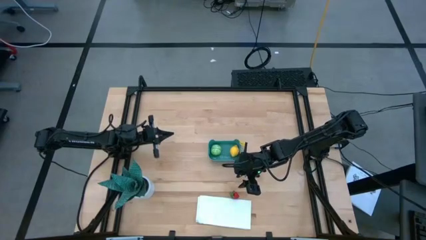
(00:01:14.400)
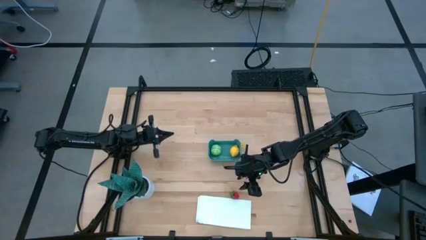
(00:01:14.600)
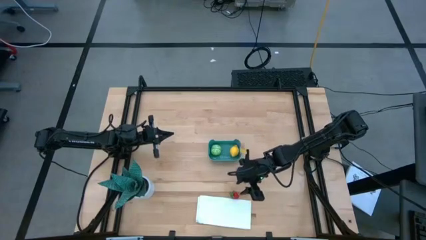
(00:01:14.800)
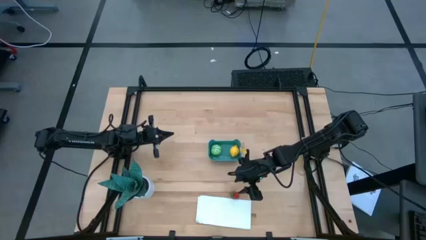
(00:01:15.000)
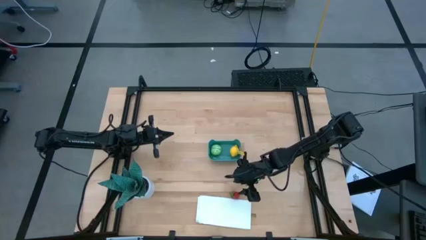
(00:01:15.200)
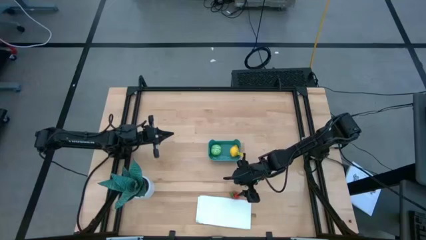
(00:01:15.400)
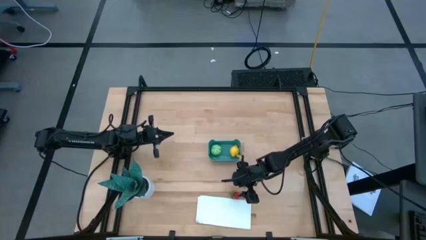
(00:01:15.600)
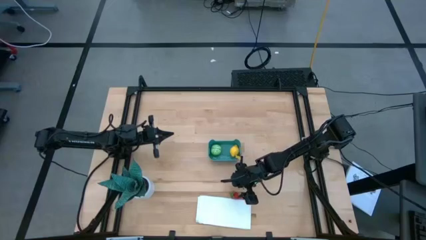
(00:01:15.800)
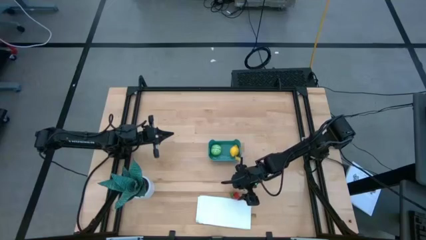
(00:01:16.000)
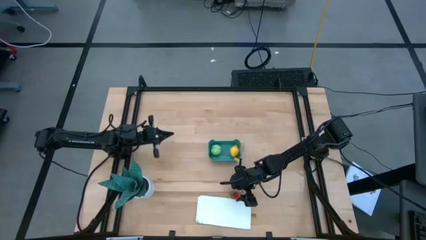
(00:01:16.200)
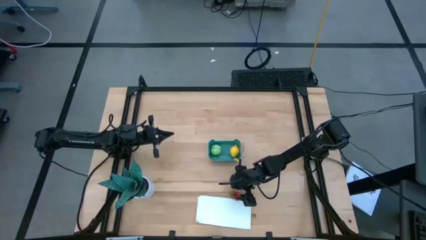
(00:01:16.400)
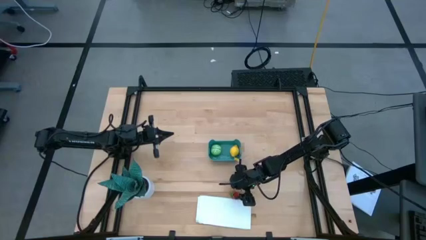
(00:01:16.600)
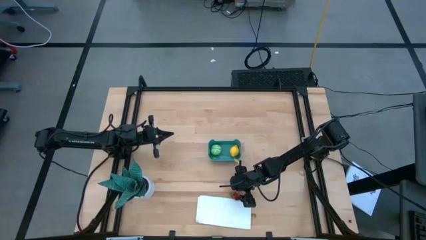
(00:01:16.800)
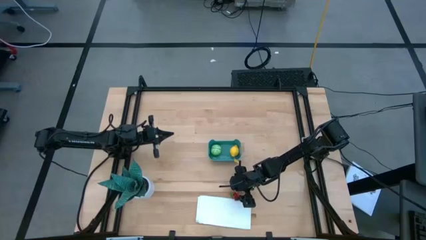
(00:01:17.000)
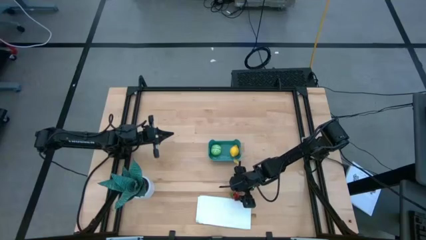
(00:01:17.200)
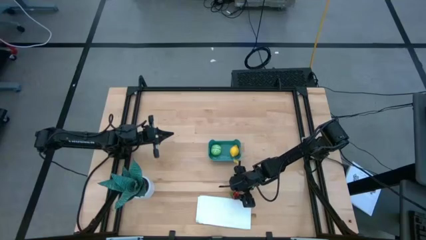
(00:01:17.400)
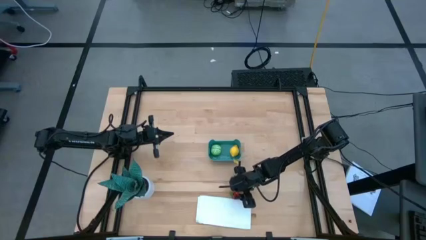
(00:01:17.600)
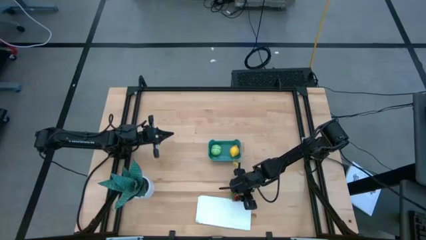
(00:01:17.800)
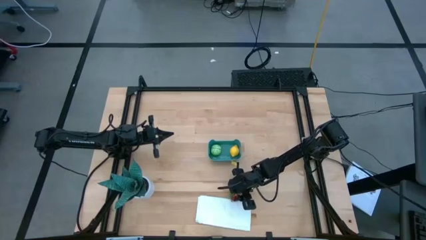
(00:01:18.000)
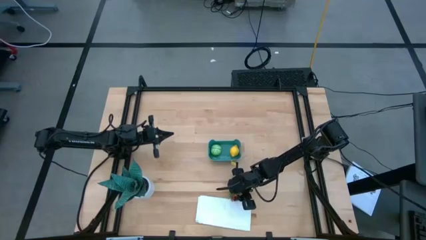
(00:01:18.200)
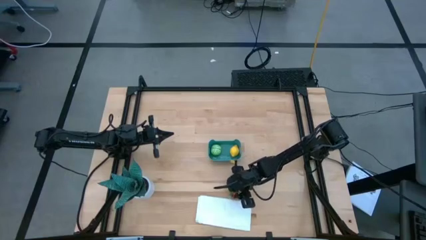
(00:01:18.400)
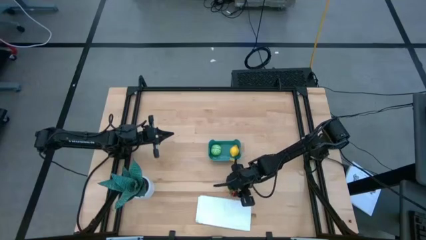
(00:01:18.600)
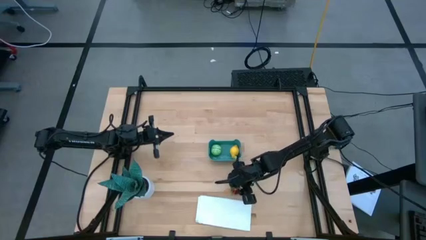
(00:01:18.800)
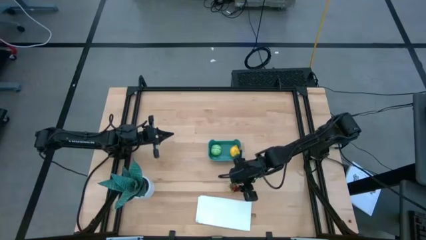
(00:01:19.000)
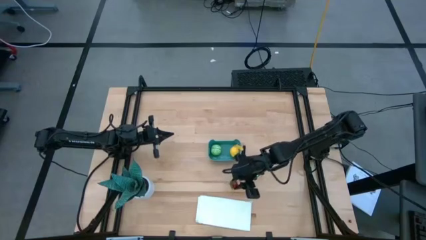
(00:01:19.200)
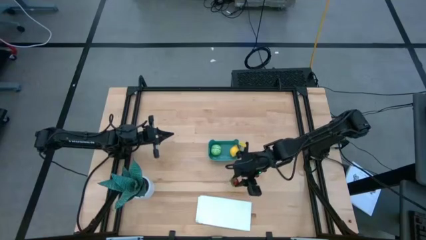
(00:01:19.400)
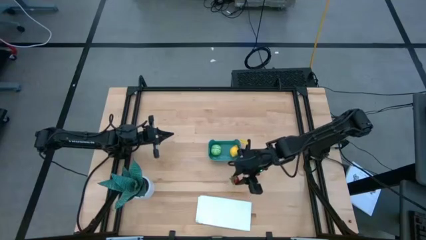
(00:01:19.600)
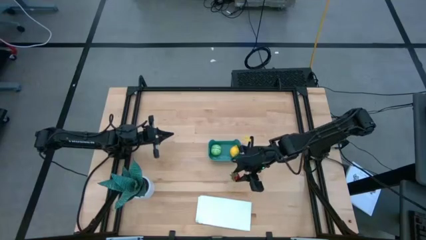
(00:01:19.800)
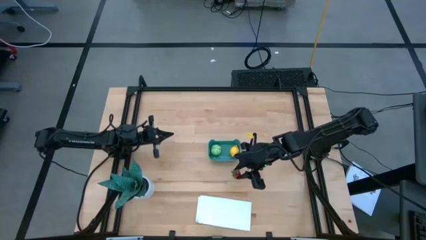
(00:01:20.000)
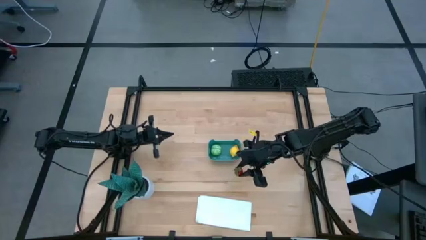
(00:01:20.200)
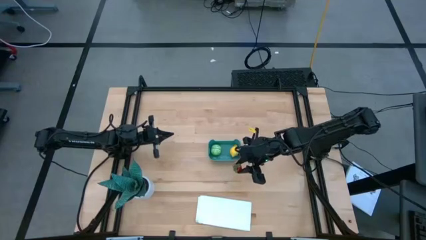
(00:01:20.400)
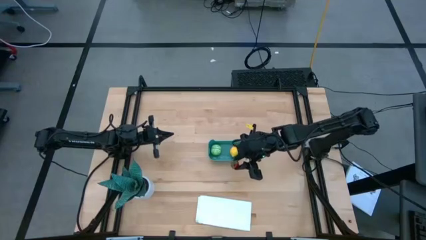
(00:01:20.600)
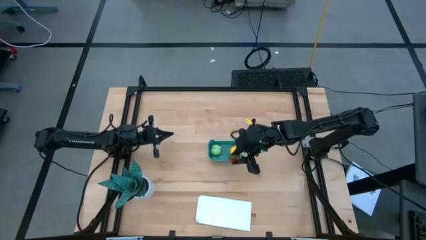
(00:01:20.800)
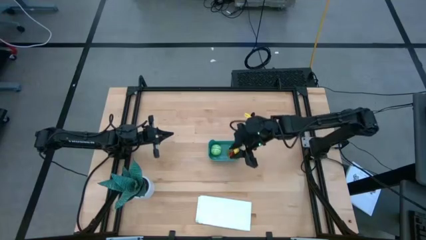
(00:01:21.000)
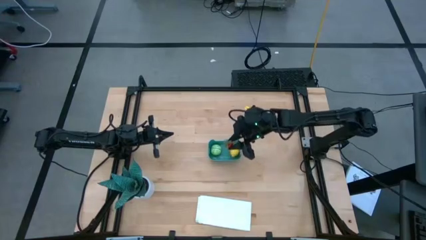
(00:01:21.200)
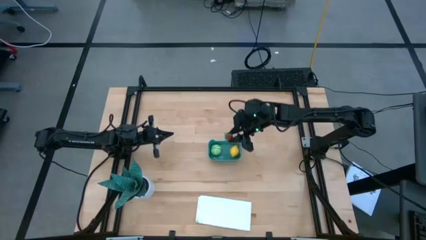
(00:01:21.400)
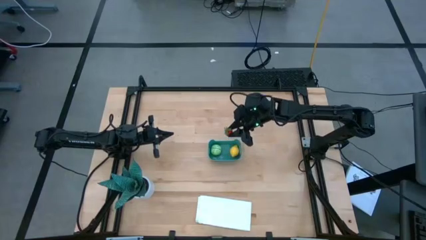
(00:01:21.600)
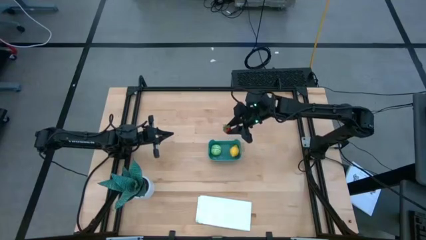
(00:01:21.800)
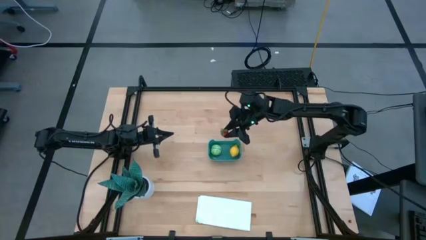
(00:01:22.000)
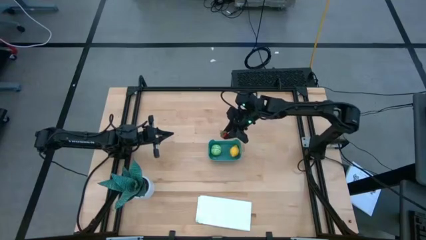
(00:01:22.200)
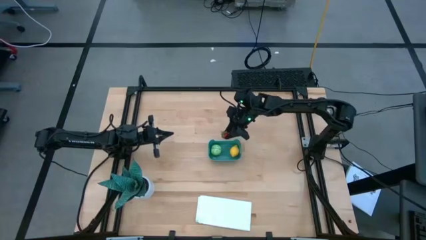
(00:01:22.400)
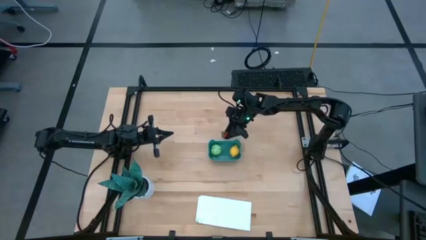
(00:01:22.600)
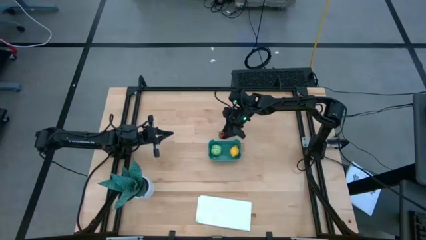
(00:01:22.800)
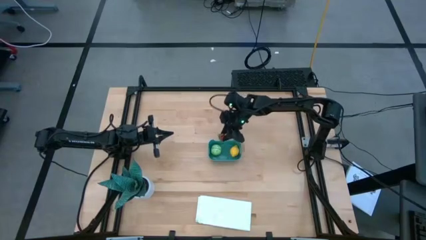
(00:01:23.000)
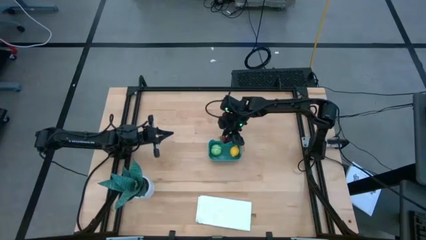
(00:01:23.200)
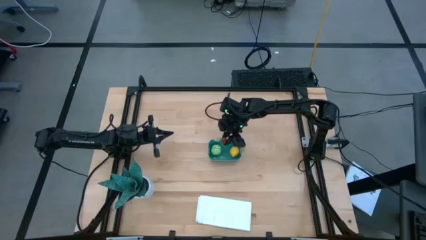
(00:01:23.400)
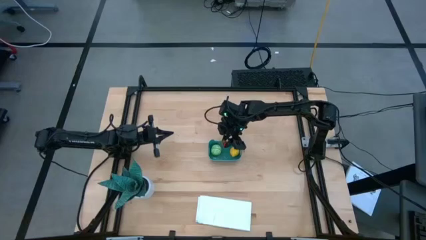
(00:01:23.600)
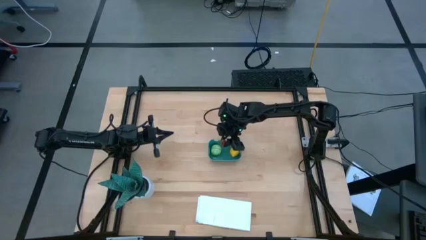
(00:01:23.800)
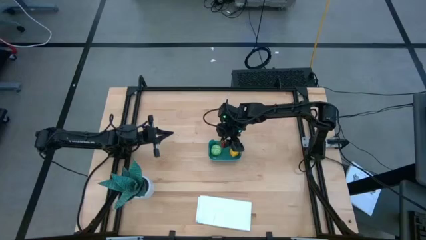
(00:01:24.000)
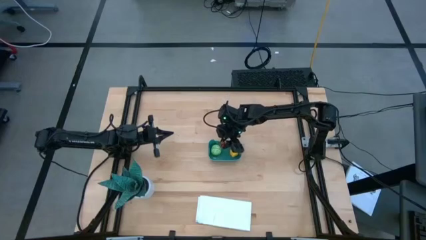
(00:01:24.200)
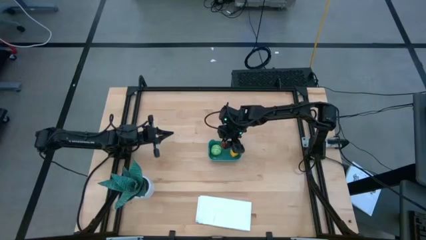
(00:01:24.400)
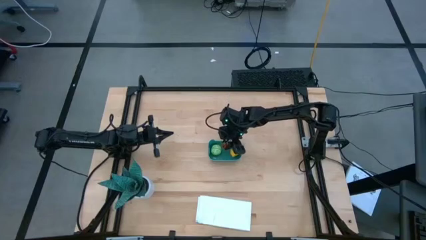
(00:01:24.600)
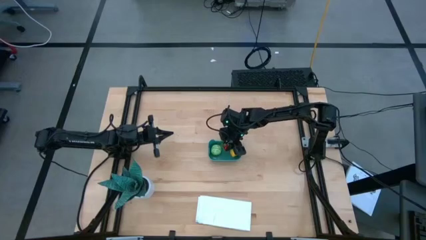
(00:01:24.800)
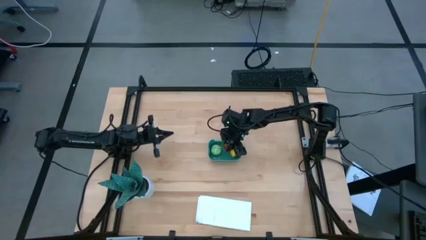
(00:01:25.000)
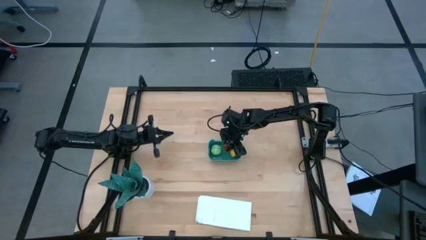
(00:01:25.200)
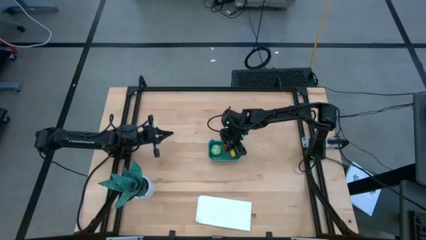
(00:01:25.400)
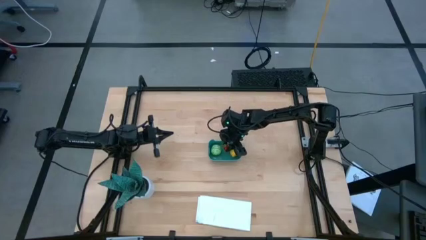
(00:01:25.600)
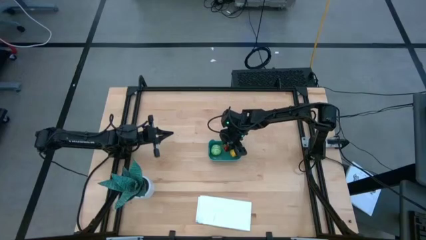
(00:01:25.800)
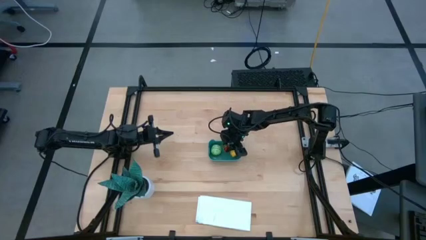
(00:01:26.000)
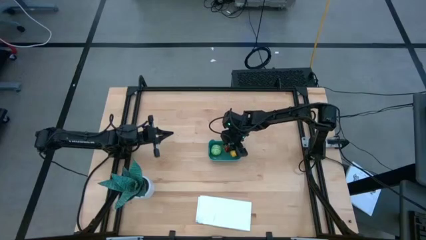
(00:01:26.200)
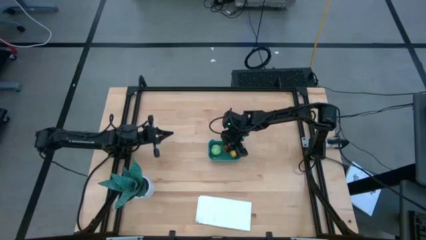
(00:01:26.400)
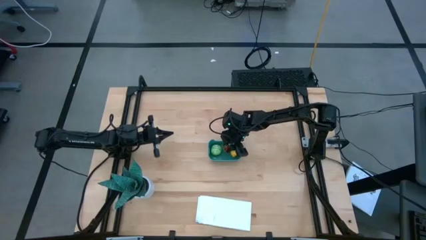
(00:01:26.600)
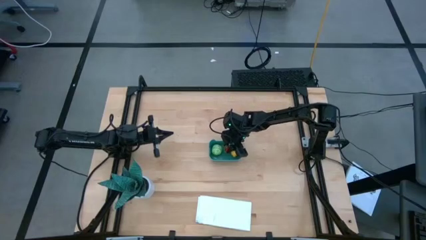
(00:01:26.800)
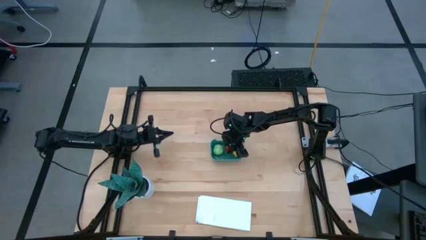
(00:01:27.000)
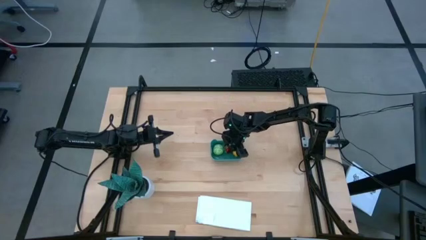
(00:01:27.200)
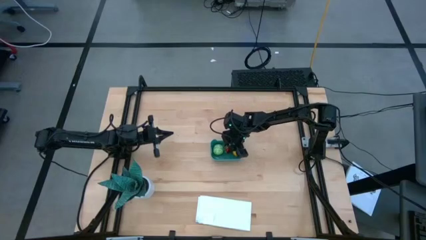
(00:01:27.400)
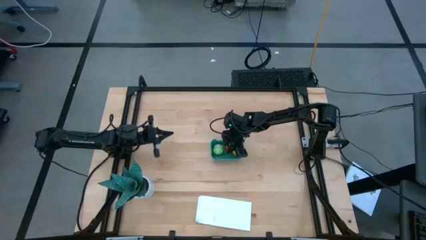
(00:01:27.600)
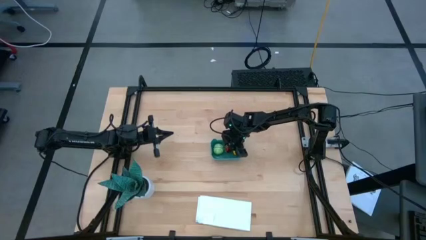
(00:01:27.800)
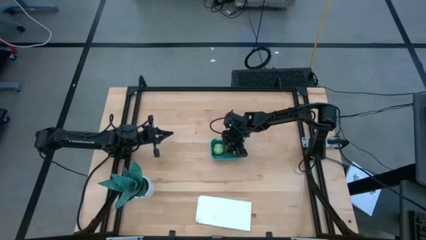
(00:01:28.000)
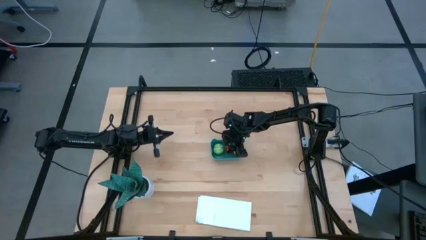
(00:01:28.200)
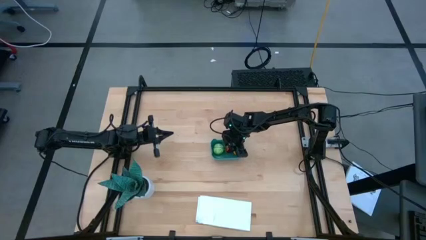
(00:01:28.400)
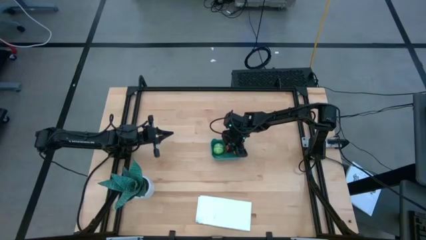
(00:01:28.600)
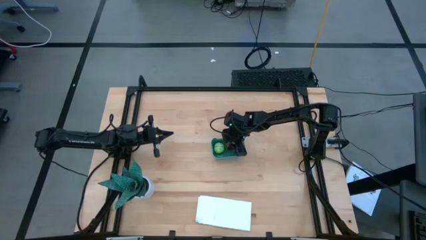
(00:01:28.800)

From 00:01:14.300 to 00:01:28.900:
Task: Pick and placing Produce into tupperware
Put the strawberry into the green bin

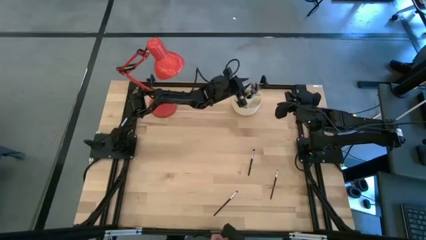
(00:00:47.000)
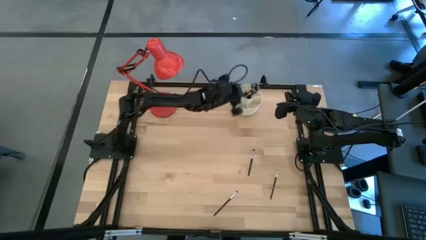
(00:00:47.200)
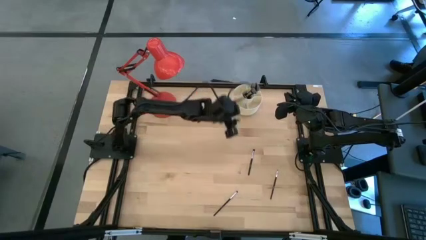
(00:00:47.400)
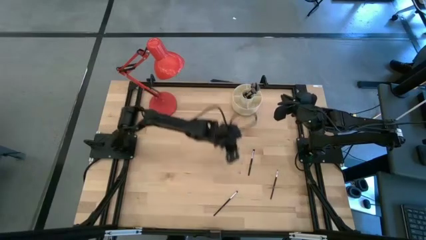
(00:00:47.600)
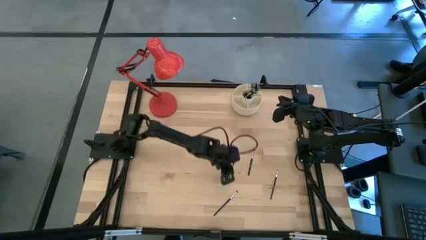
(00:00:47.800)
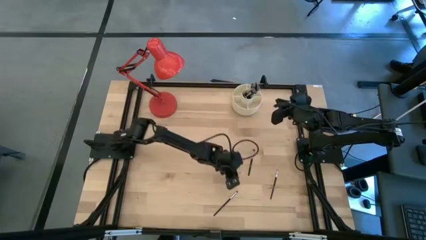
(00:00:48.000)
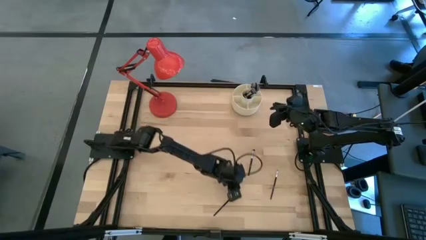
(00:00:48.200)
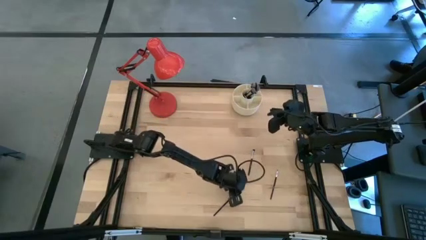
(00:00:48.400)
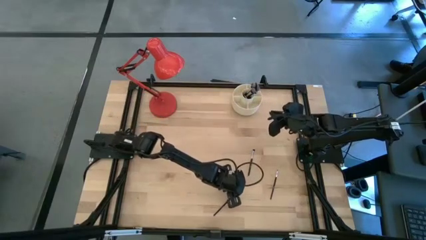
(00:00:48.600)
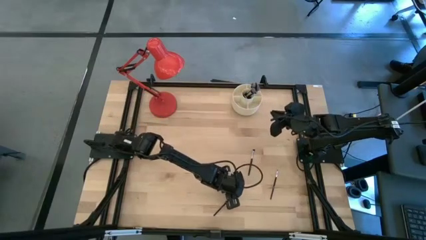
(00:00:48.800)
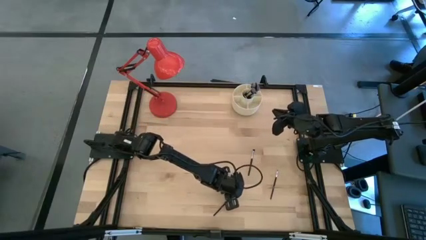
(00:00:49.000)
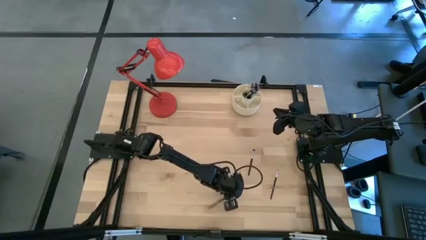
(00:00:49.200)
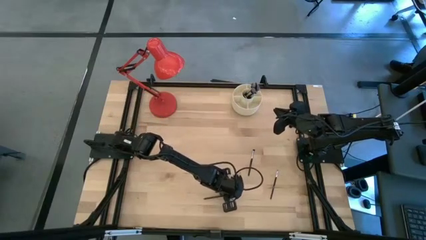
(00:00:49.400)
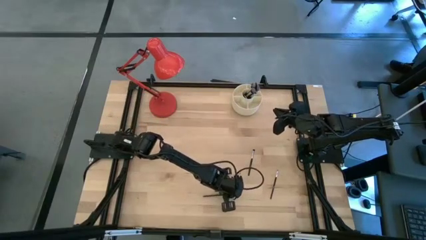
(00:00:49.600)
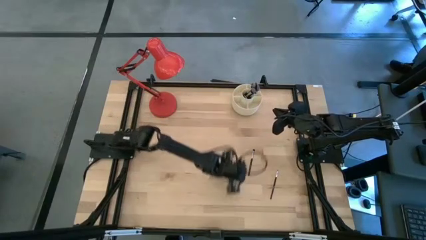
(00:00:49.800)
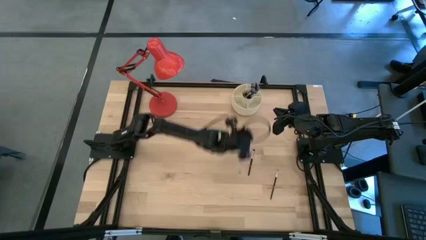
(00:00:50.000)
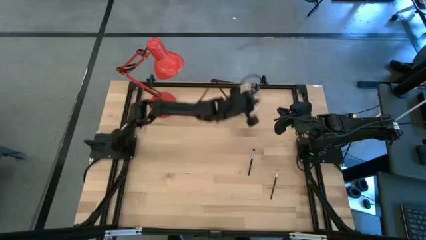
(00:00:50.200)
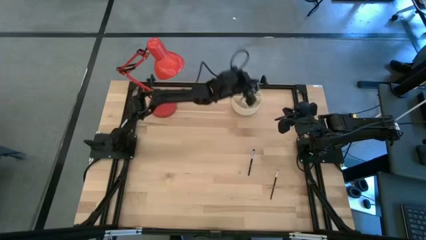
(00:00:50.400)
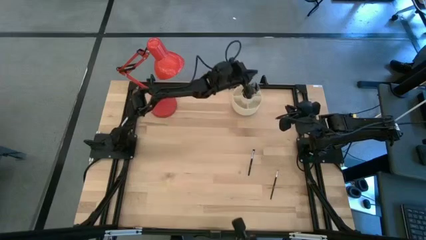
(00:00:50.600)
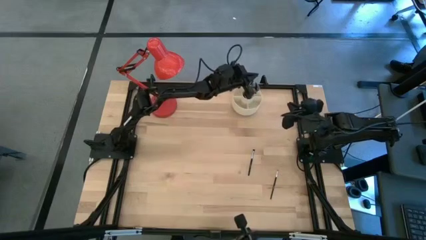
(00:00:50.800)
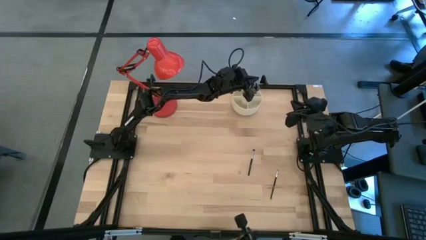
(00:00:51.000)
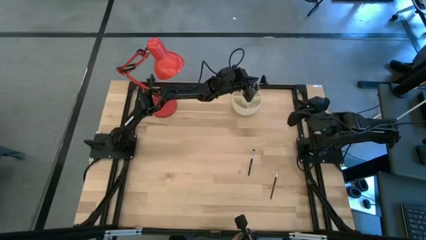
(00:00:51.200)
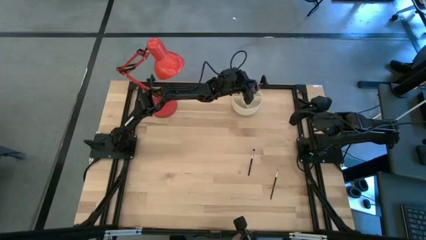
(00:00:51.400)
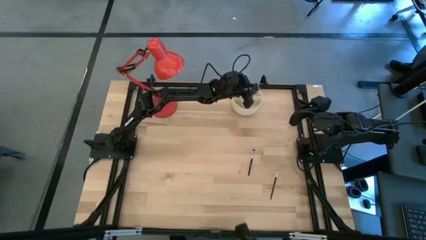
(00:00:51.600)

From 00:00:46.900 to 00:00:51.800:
Task: Put items in baskets/containers
Put the black eyeshadow brush into the white organizer
